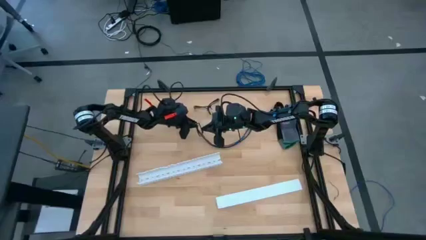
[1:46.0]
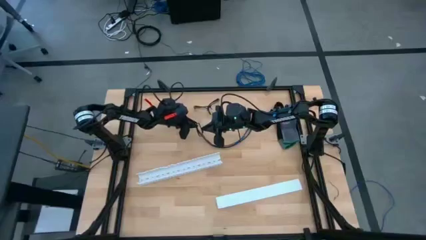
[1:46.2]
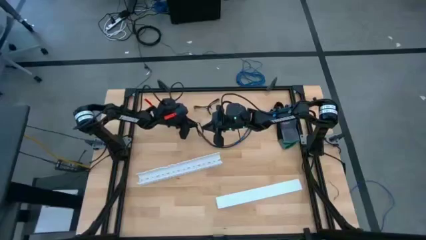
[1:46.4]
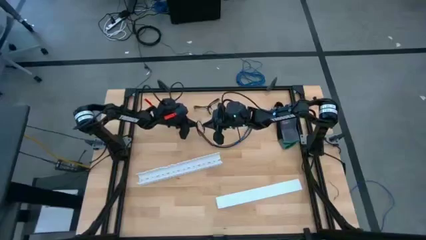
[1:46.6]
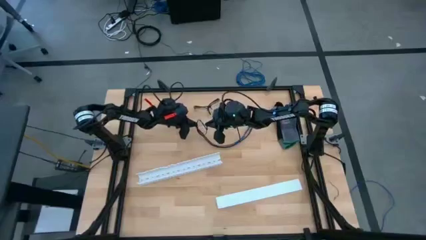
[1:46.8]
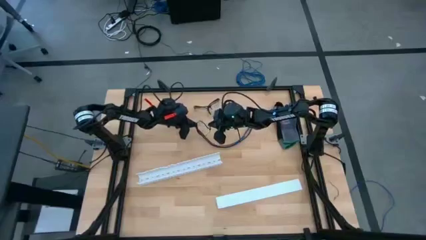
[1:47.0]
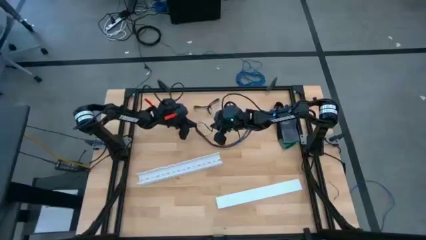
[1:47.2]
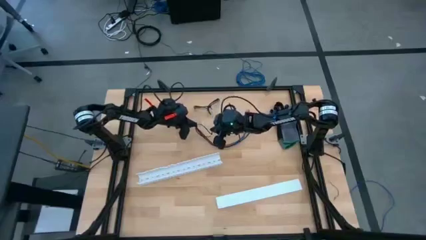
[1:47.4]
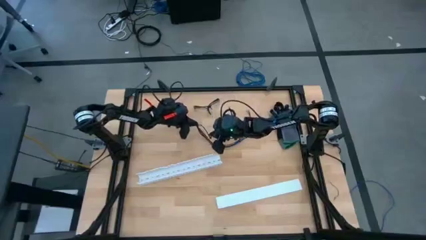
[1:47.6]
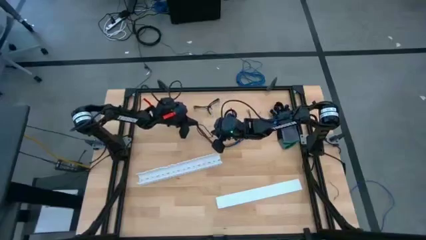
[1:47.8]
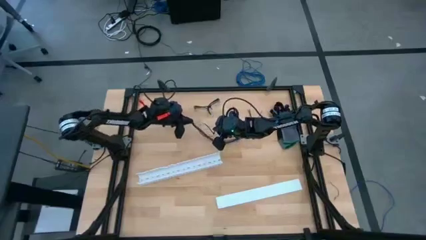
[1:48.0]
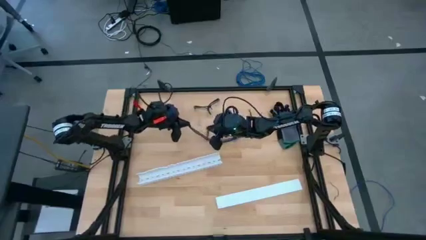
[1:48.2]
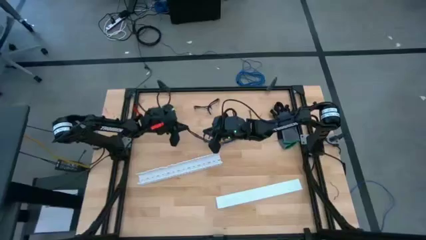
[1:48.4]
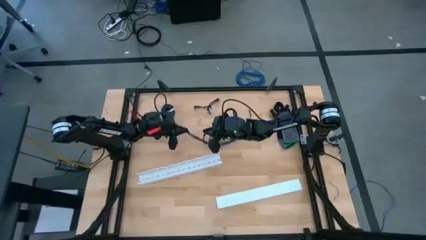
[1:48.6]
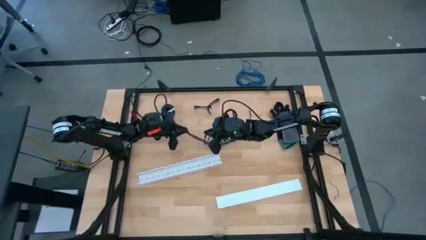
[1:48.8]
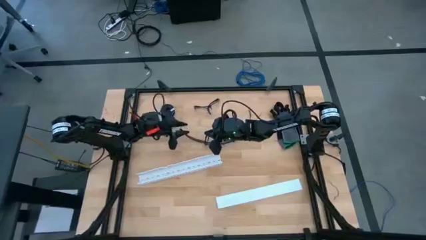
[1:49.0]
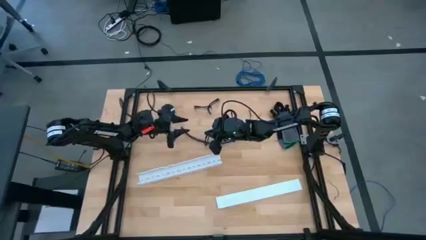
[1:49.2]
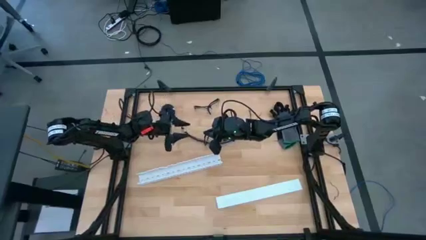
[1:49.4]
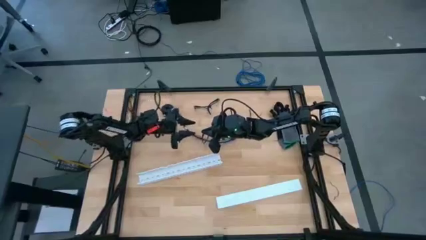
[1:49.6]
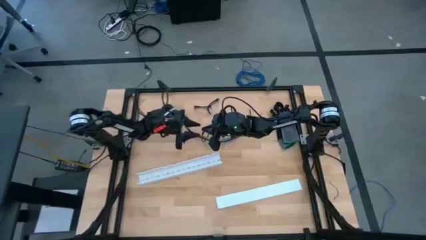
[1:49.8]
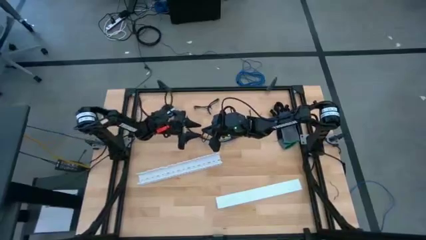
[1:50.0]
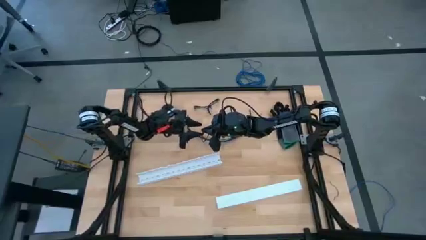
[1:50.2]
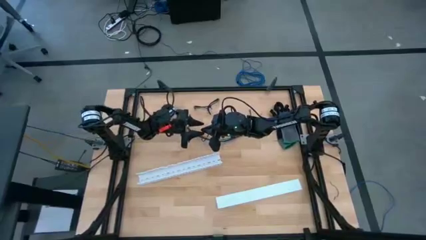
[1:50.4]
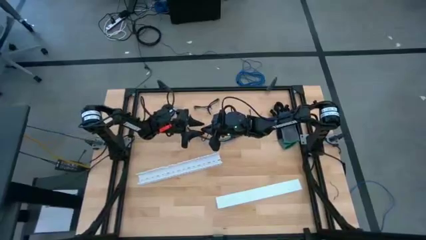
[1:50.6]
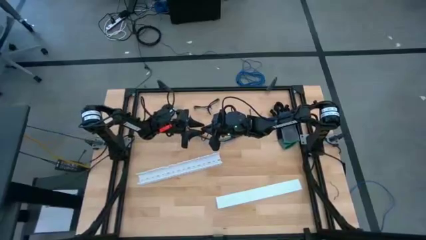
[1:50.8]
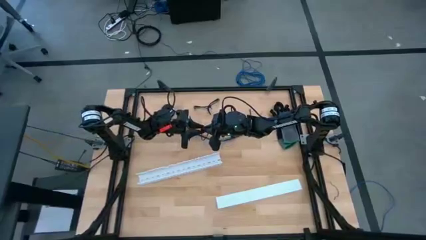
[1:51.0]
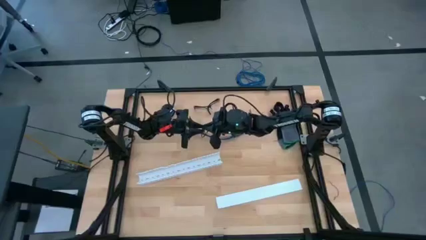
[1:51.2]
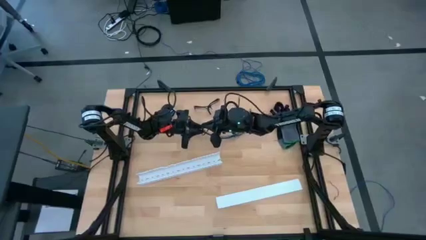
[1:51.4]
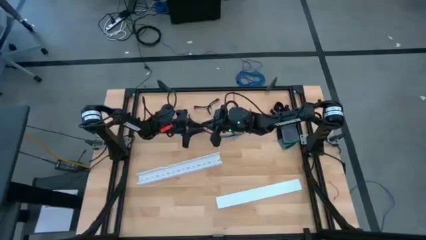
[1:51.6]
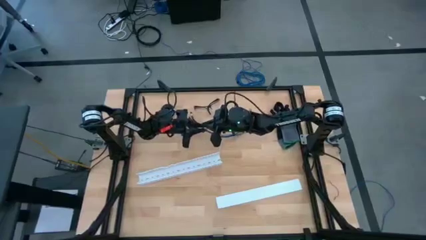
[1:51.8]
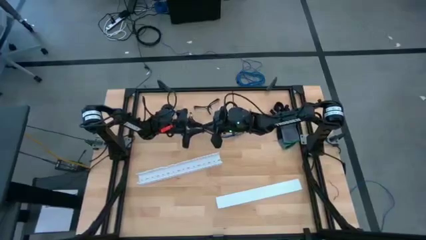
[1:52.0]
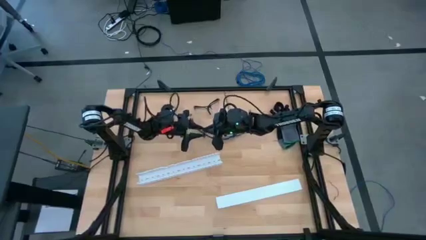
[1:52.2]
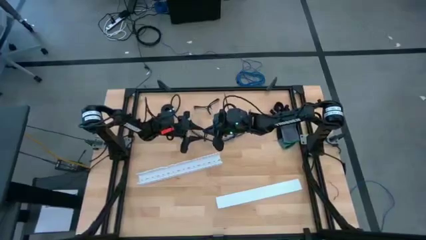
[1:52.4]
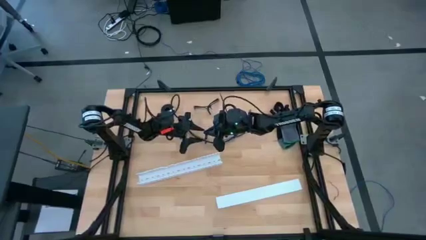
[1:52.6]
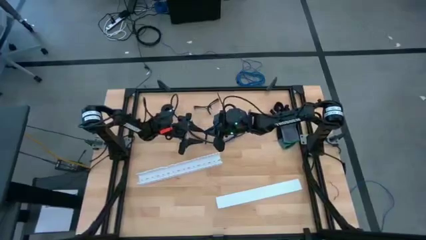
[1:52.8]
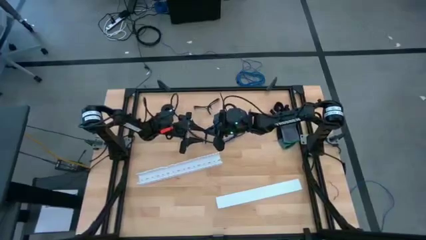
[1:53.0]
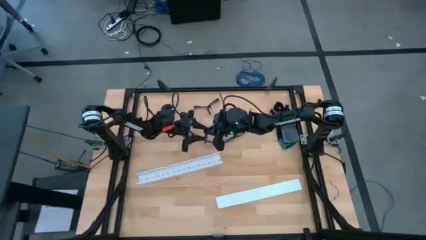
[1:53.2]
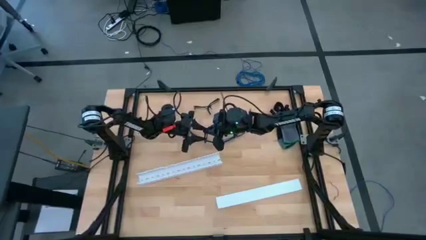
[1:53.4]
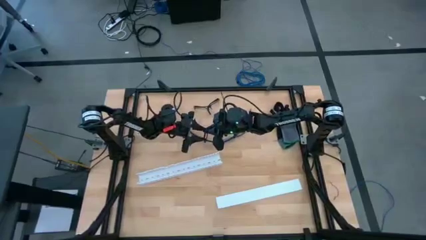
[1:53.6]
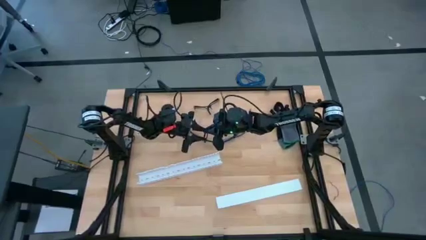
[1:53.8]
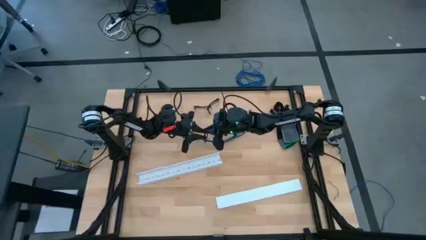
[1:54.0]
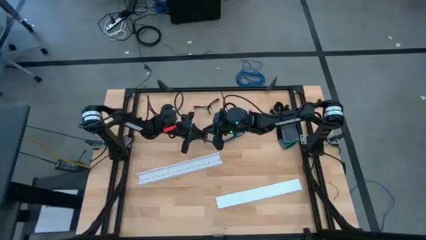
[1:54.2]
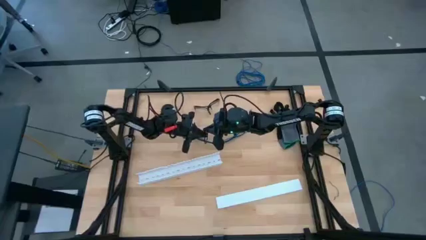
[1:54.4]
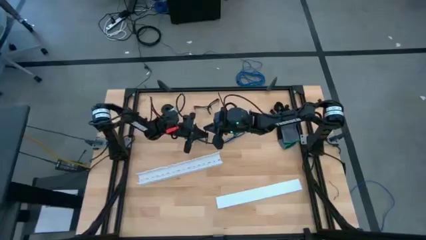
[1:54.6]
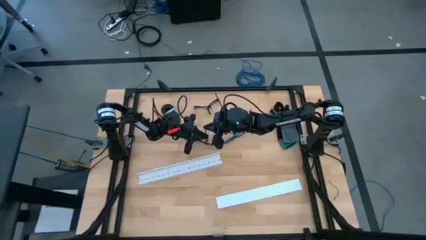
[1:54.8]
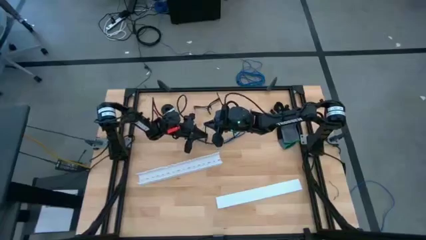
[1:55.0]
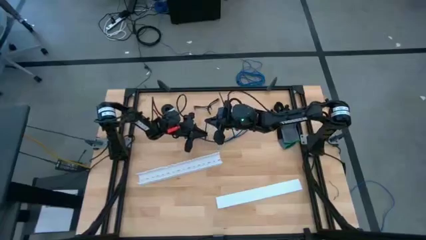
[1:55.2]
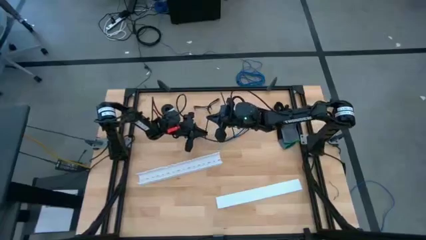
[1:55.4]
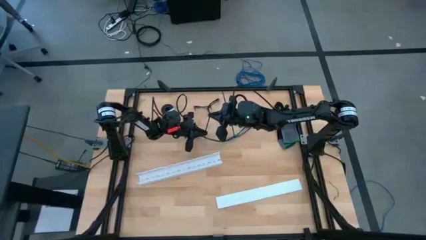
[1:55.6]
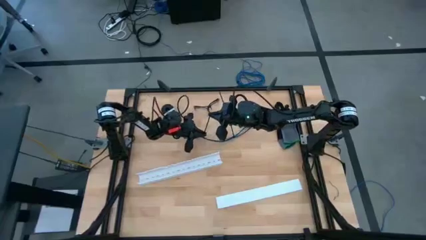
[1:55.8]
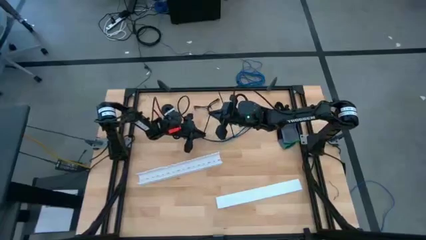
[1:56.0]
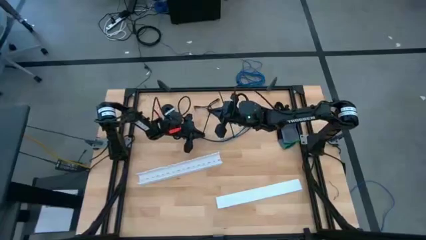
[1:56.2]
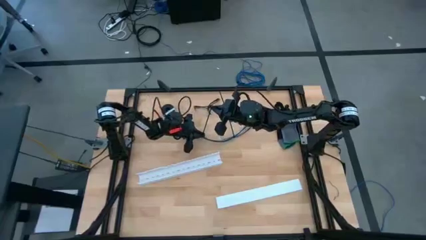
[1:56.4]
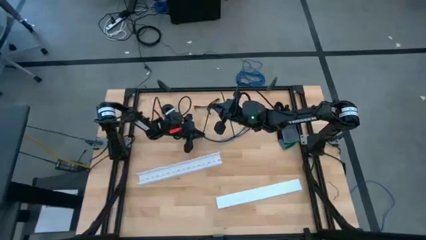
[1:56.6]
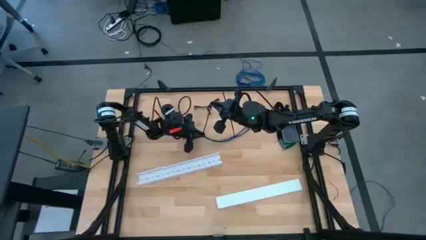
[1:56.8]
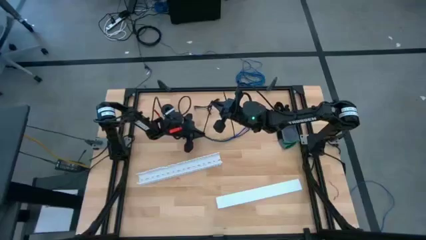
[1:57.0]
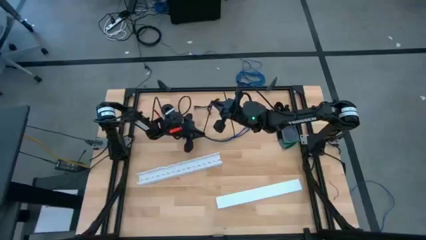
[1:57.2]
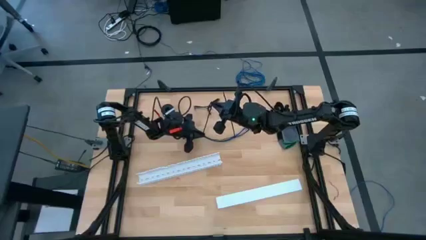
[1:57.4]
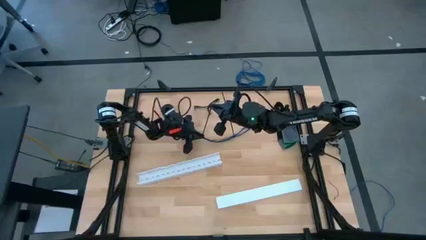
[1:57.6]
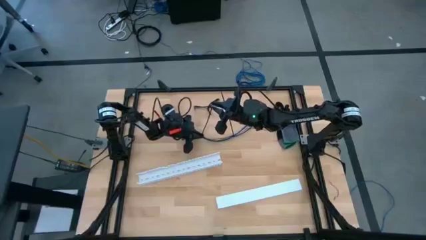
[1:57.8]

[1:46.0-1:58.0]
Task: Ziptie cables
Wrap the cable wires with the black zip tie

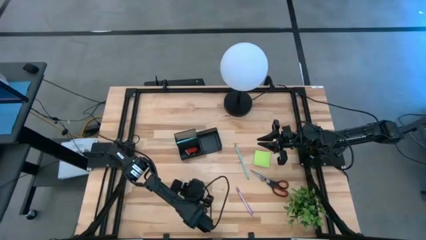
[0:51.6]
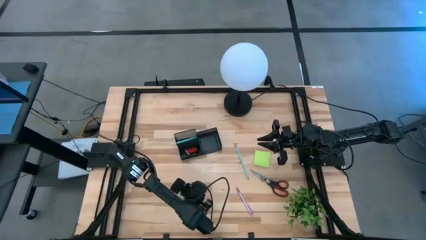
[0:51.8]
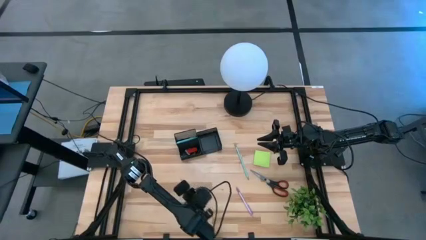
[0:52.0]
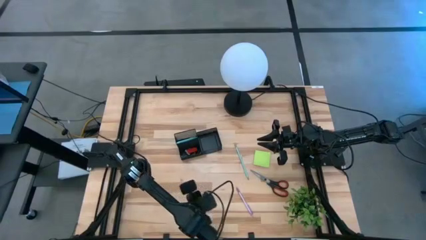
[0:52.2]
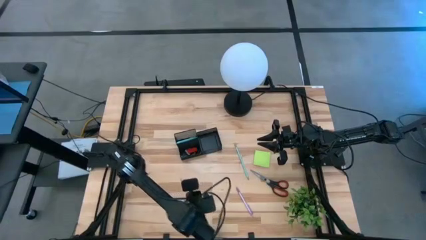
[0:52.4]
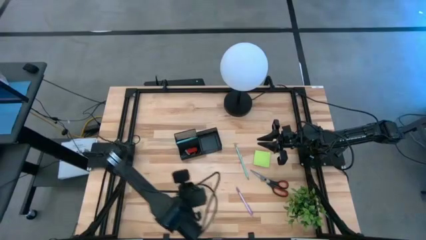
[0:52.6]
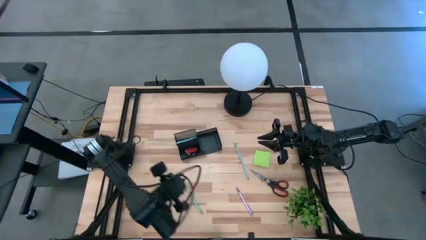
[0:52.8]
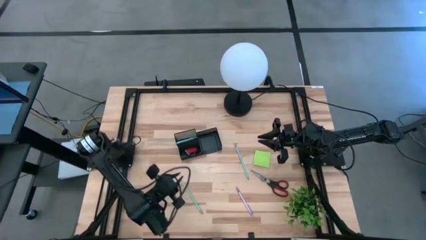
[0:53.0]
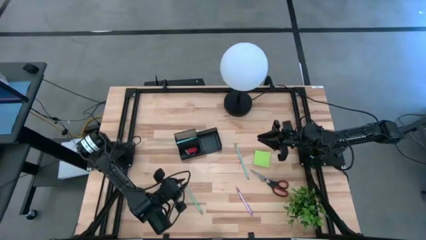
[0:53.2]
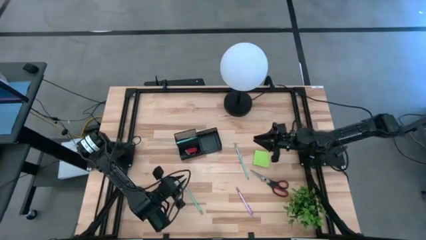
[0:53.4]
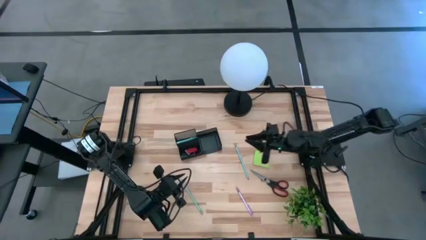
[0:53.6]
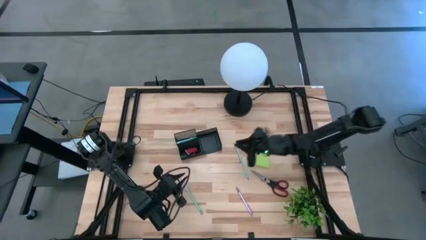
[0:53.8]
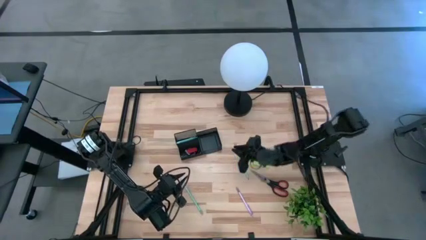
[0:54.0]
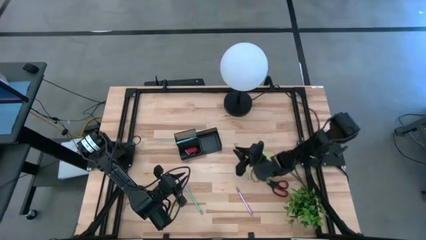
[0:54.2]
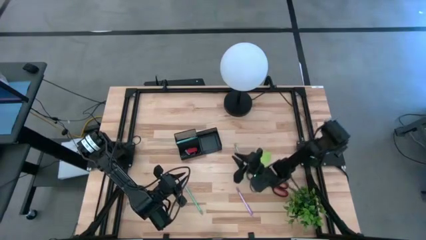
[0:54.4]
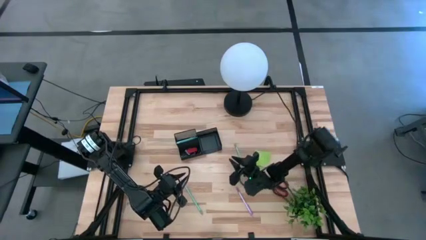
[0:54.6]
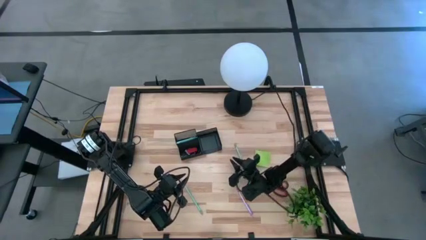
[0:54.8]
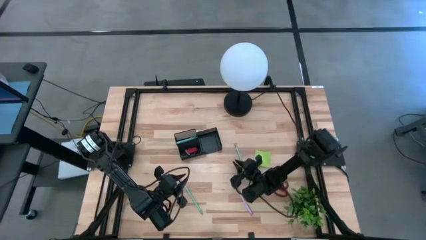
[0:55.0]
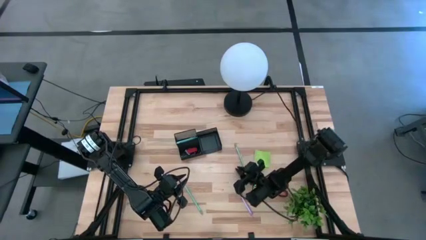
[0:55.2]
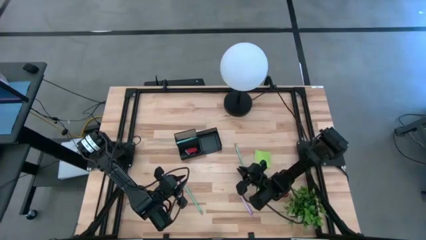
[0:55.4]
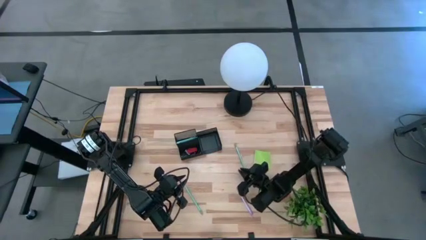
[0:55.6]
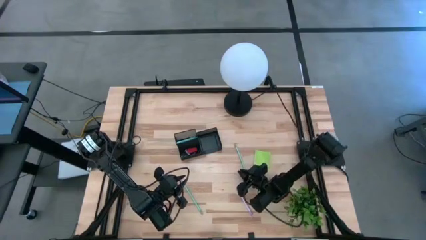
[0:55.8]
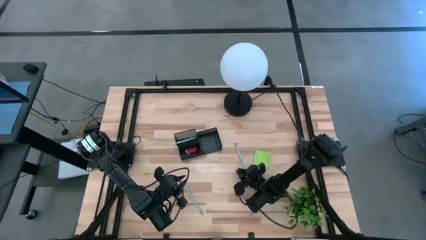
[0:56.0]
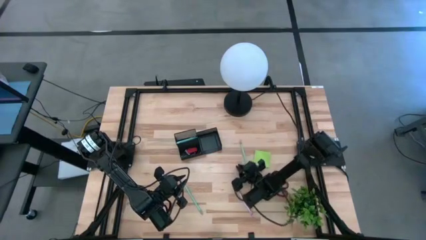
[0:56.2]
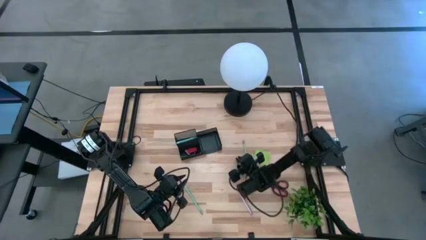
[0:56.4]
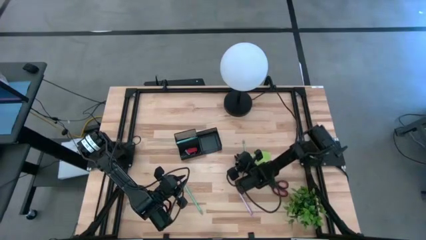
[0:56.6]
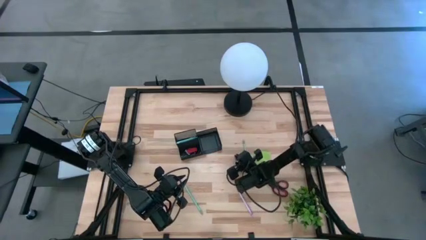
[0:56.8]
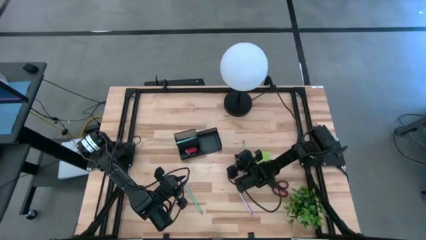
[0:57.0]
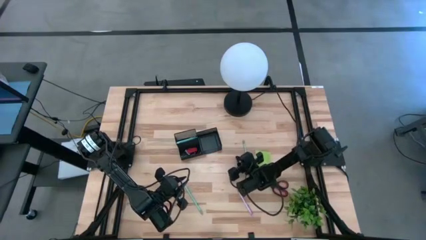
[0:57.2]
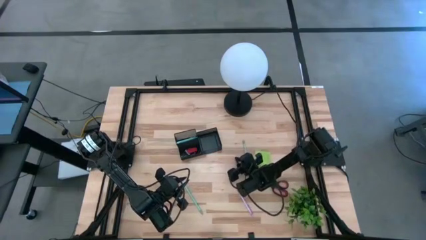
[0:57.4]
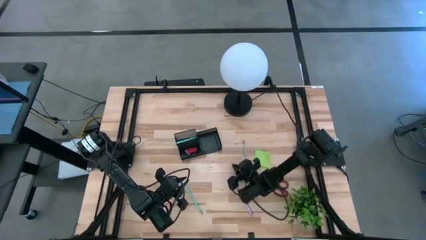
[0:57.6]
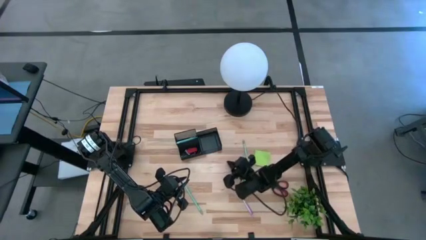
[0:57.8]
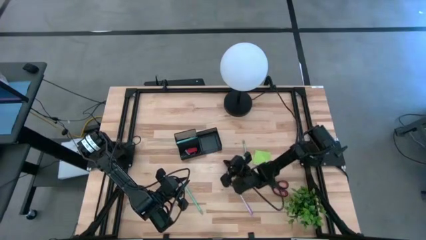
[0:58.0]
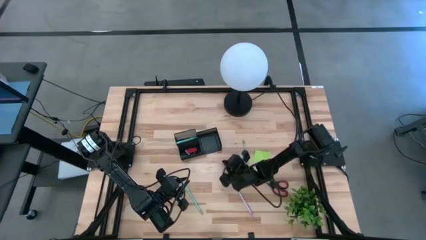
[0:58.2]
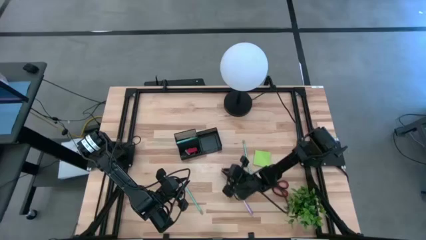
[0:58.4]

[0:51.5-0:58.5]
Task: Pick and place office supplies into organizer
Put the right blue pencil into the black desk organizer
